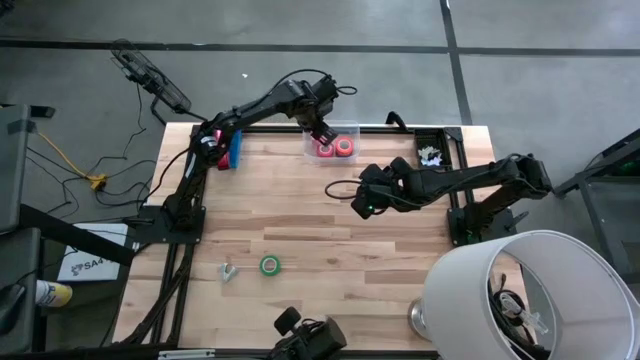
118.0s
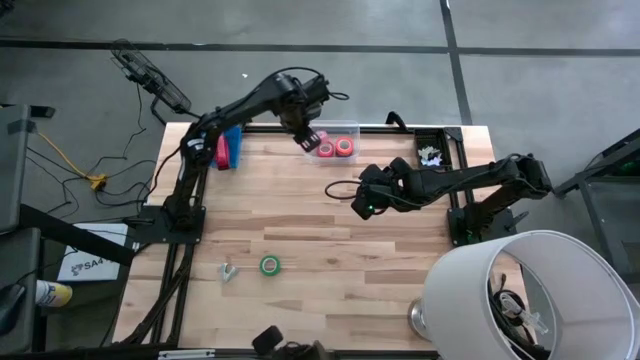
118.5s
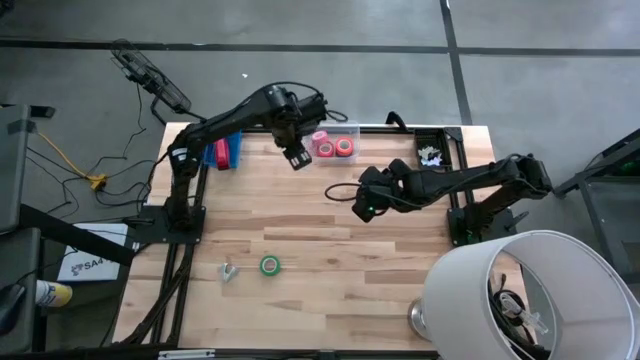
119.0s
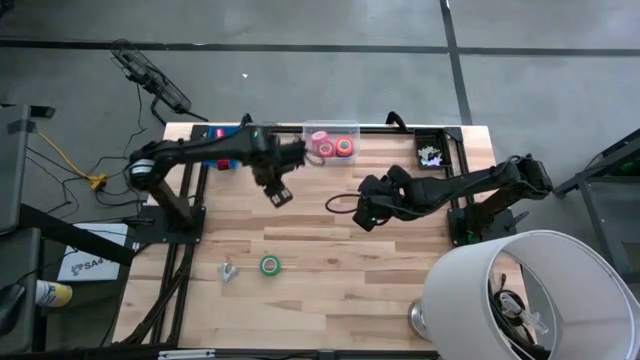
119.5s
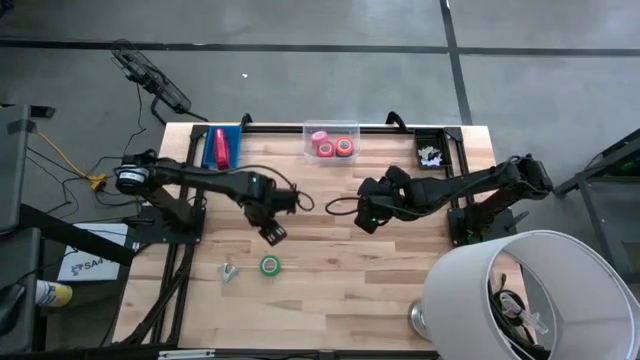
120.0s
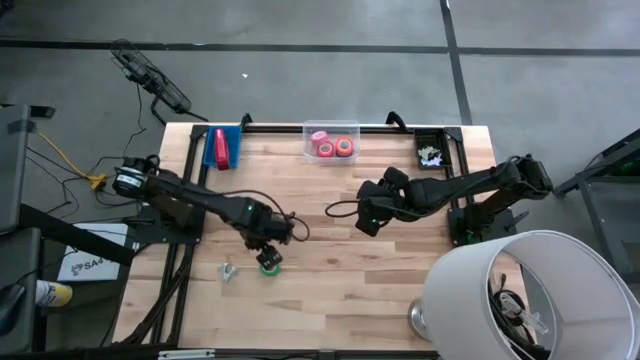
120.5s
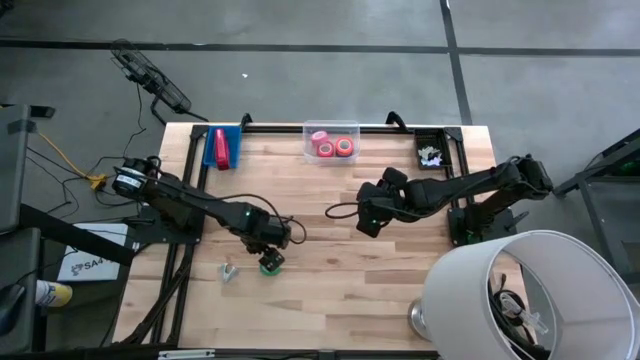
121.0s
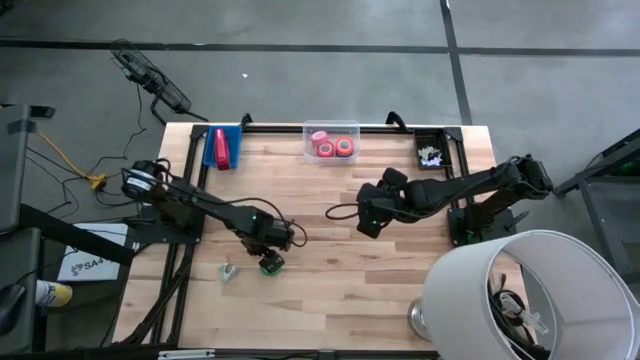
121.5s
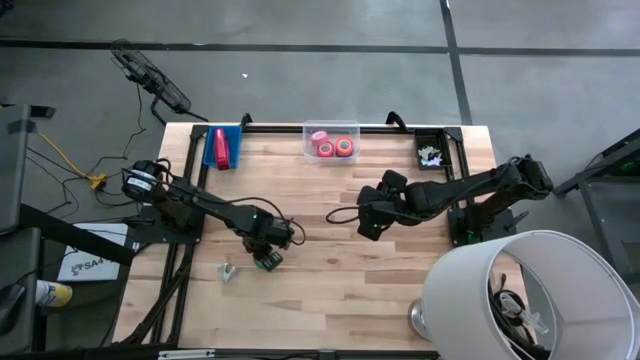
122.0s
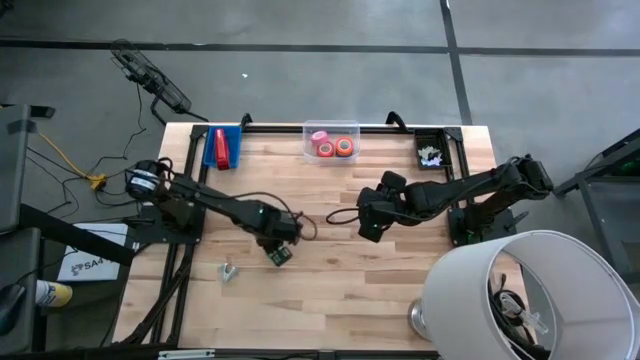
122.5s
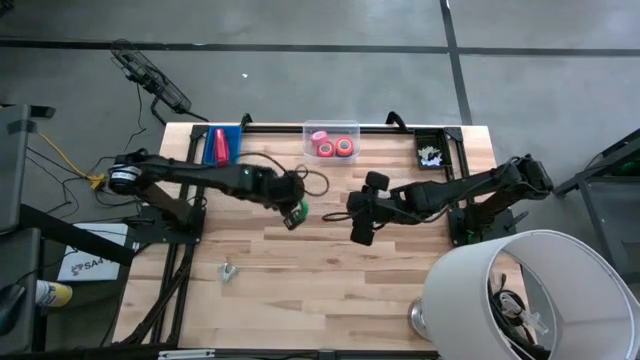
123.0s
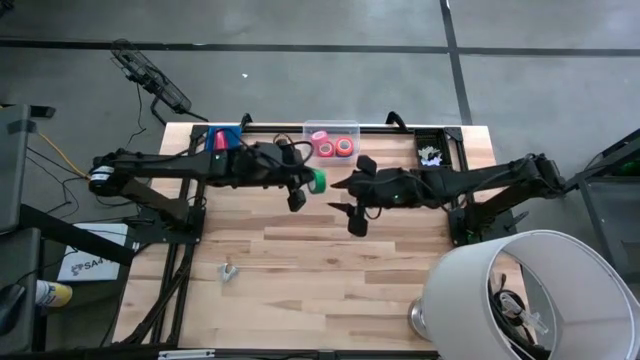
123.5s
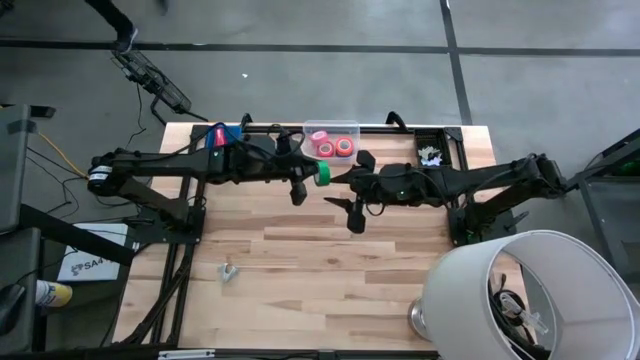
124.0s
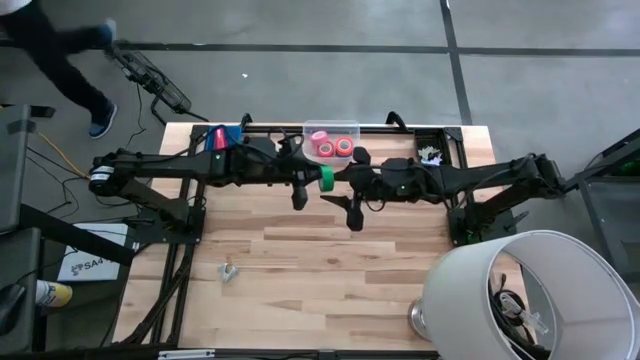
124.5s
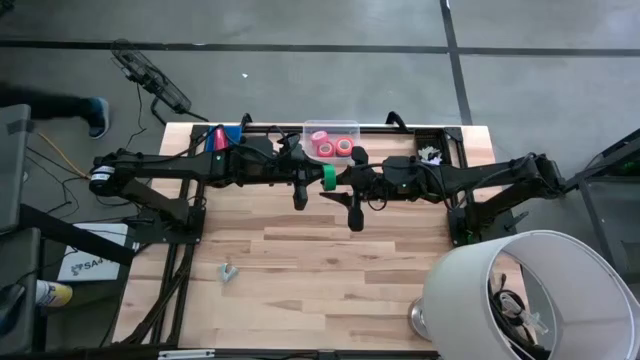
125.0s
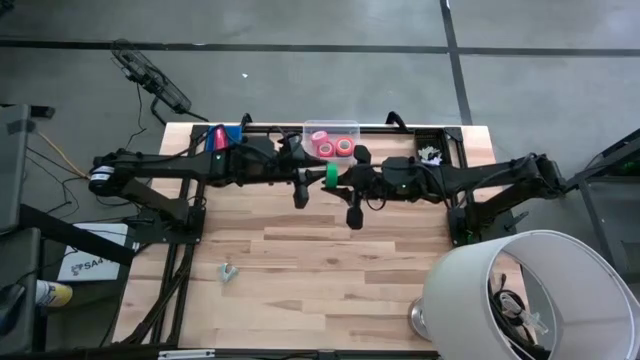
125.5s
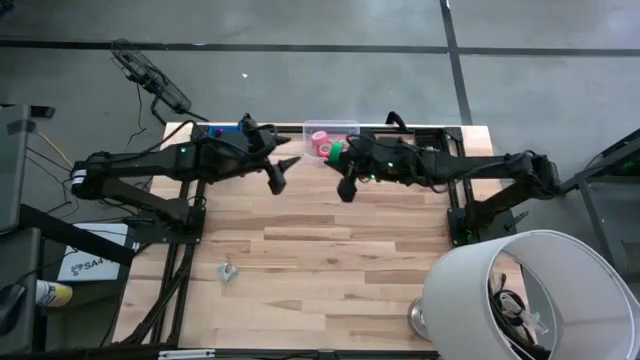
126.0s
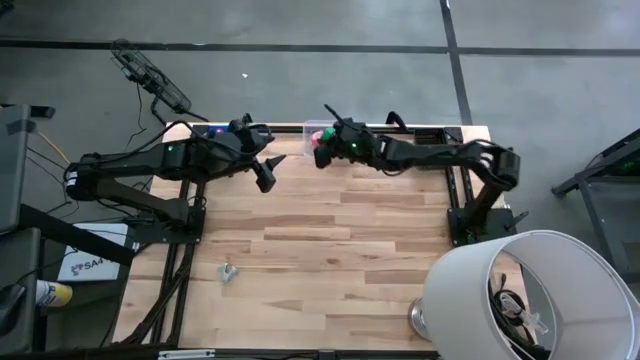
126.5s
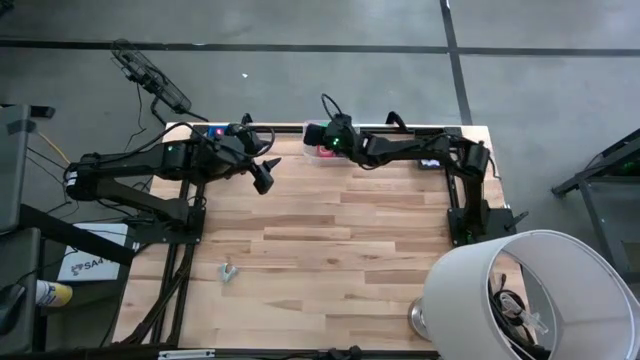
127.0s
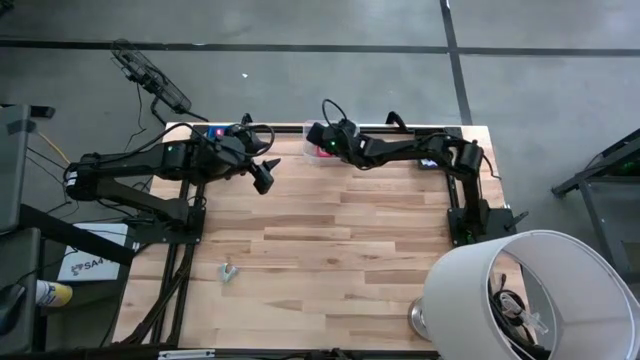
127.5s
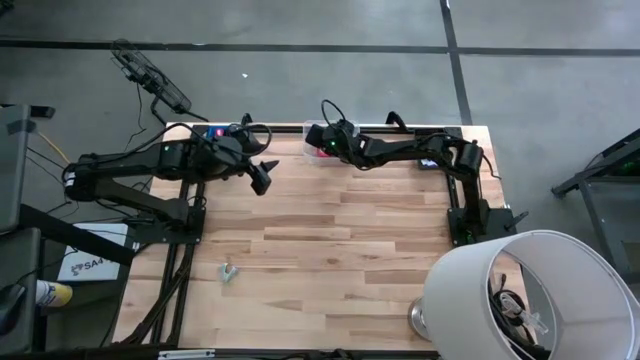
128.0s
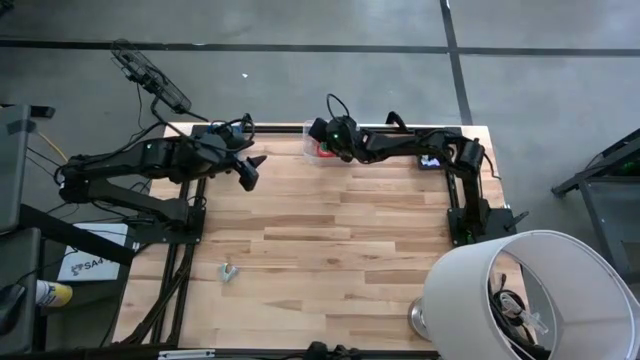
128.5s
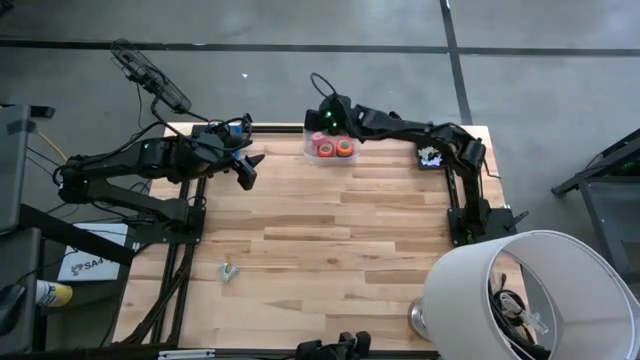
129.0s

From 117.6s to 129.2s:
Task: Pick and place Stapler, Stapler remover, tape
Put the green tape into the transparent bin

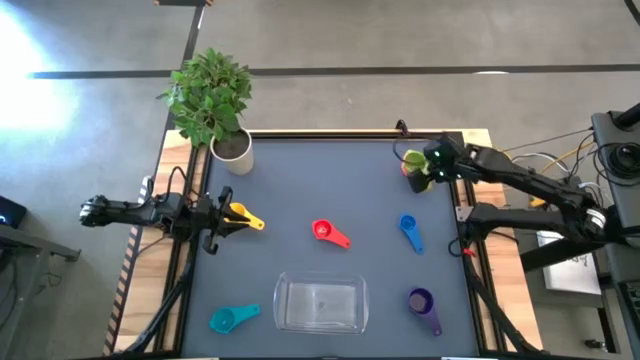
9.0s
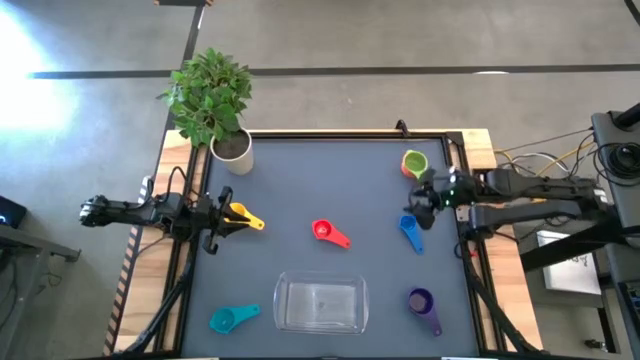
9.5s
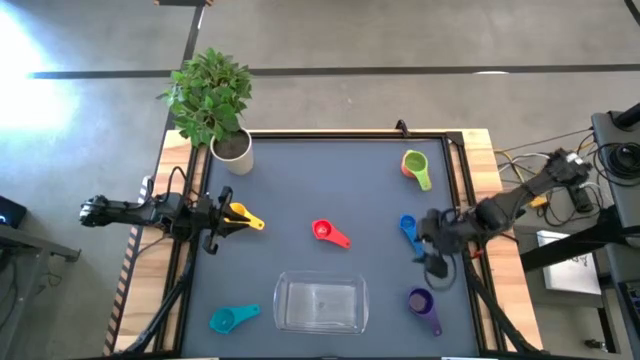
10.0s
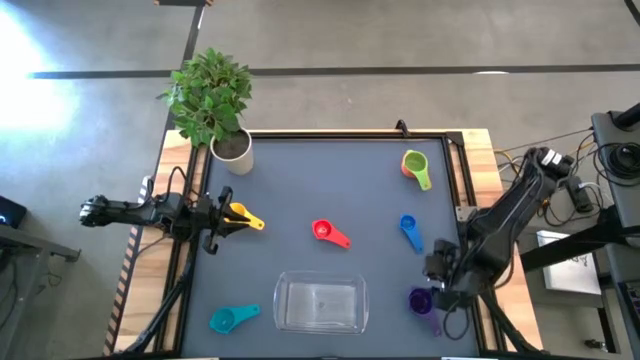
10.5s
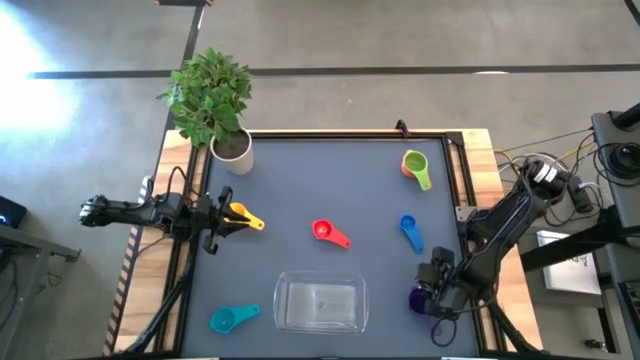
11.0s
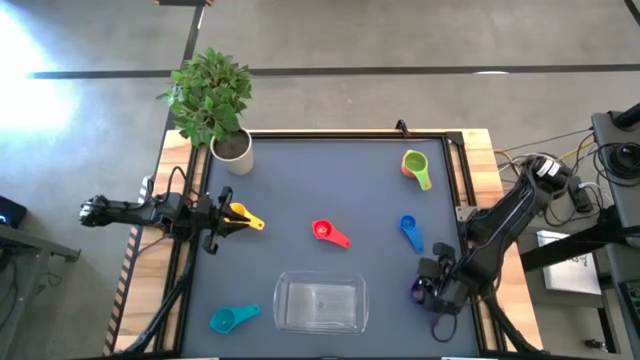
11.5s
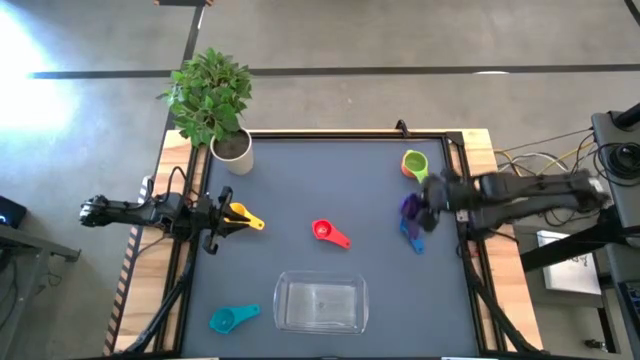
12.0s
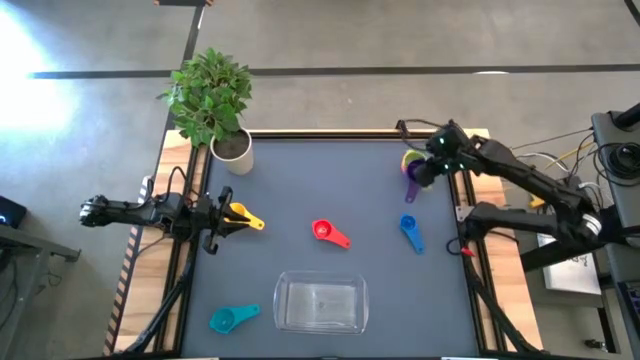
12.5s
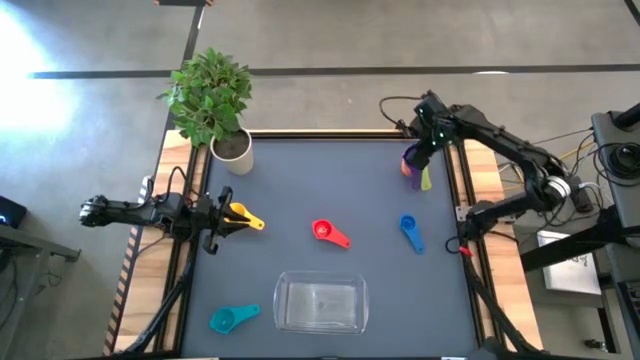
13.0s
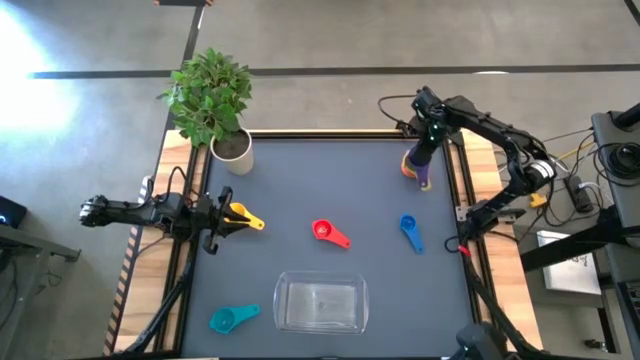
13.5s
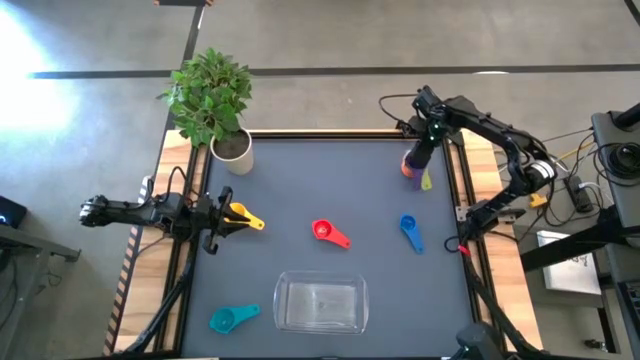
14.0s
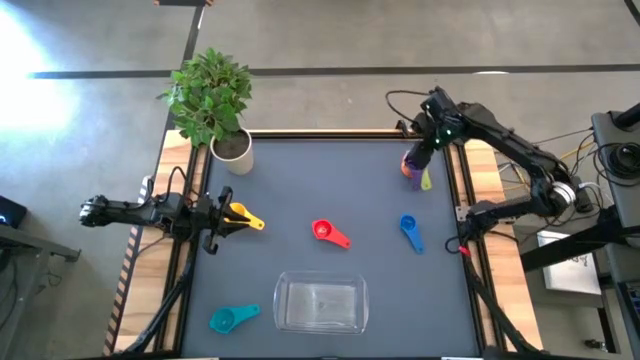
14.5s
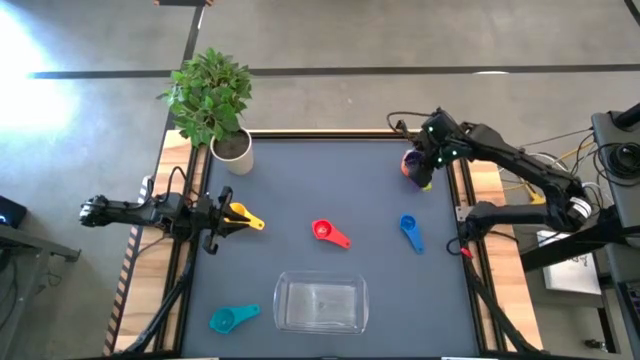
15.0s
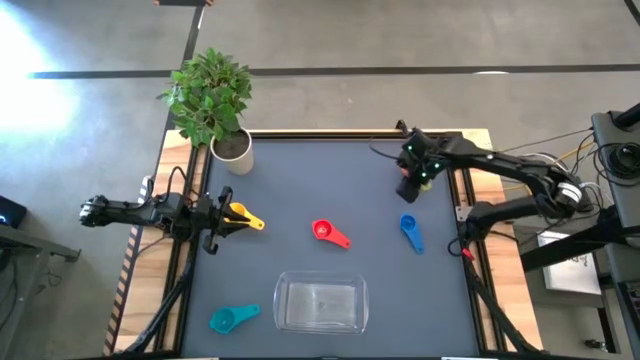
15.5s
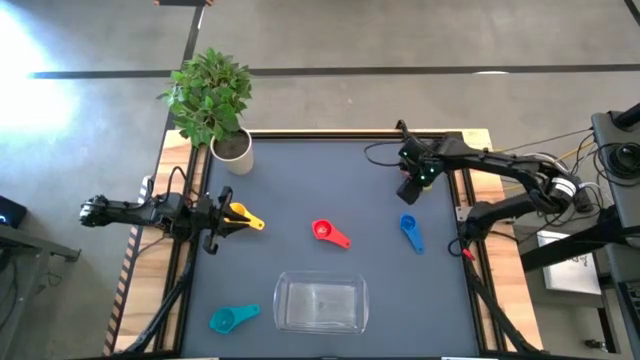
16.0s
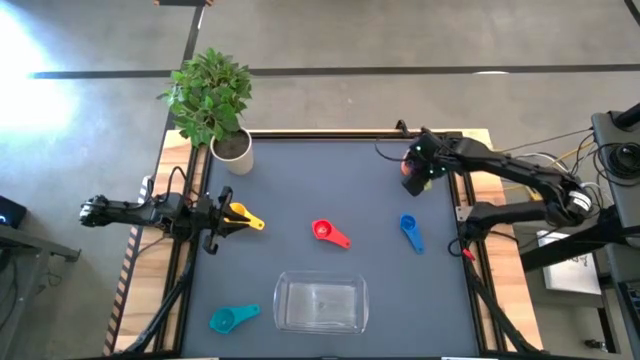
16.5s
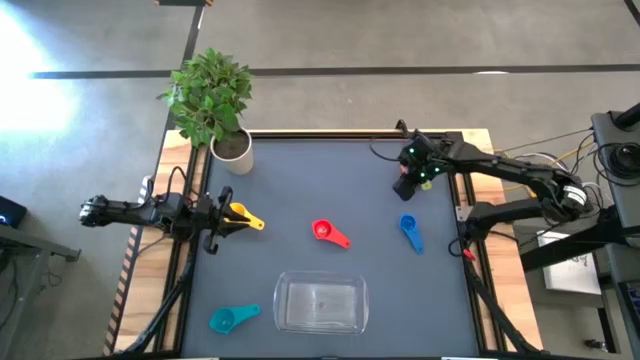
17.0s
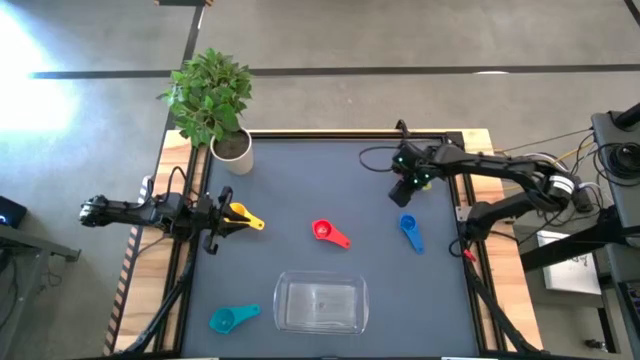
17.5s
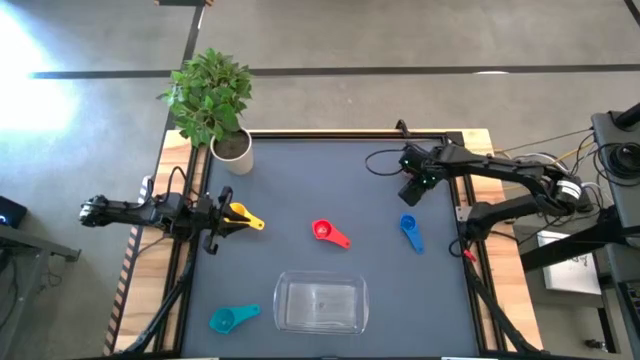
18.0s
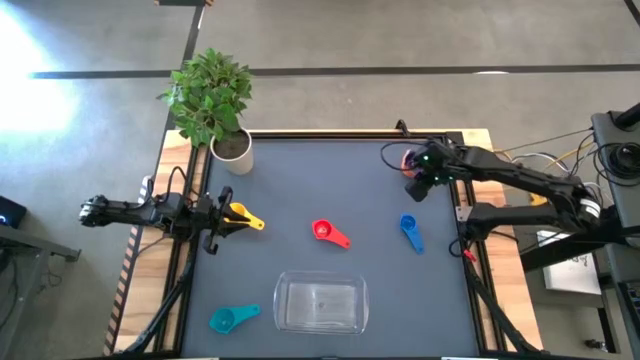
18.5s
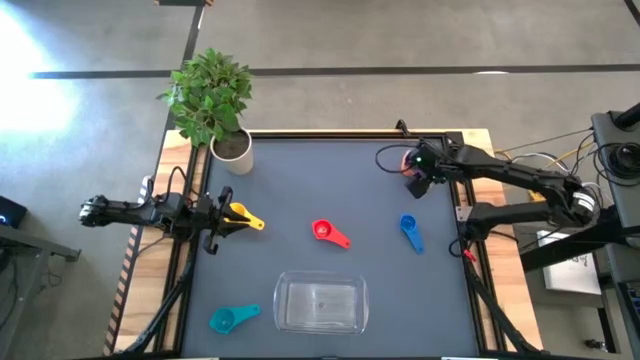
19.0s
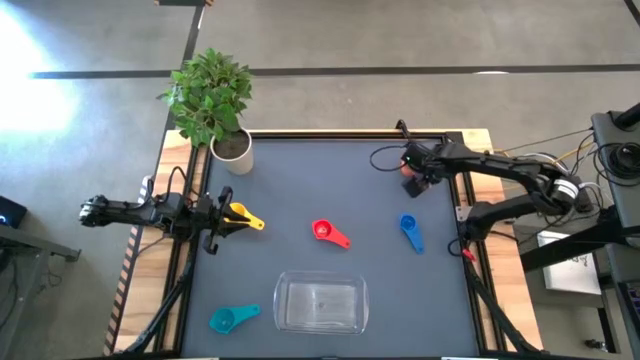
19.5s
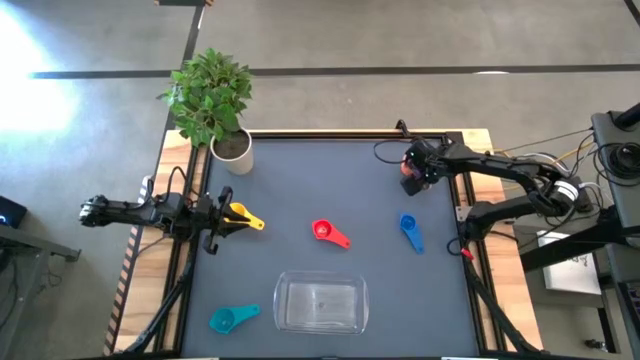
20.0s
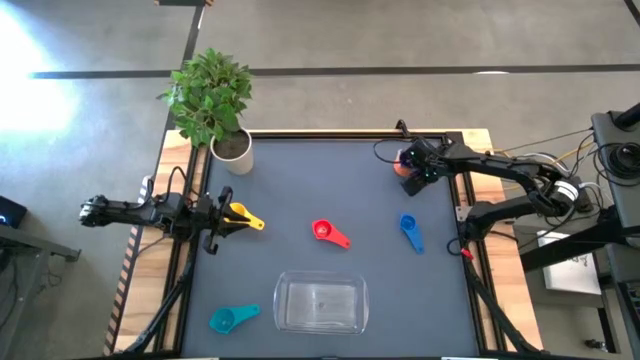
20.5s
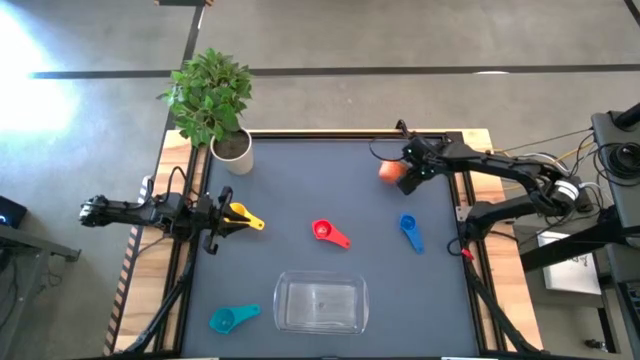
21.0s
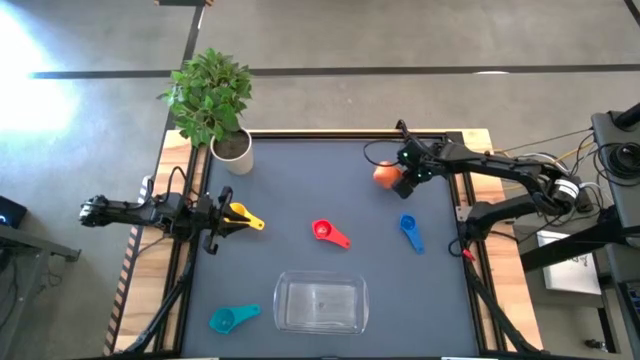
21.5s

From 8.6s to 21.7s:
Task: Nest measuring cups in basket
Stack the violet measuring cup on top of the green measuring cup
